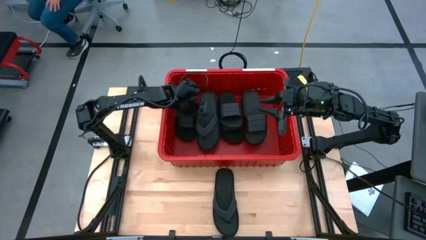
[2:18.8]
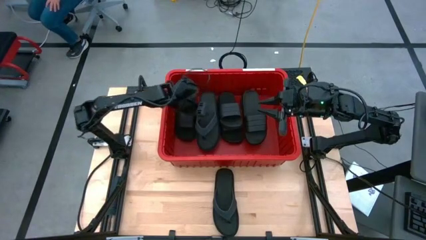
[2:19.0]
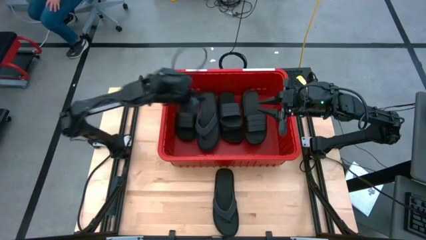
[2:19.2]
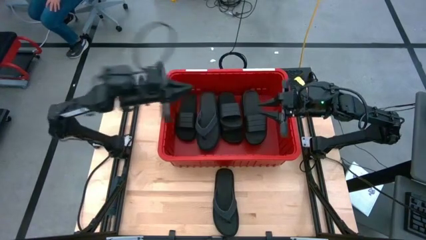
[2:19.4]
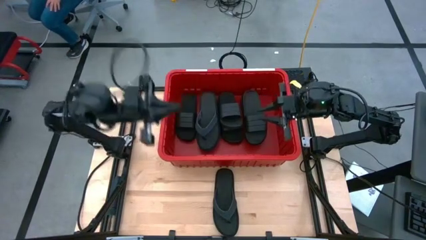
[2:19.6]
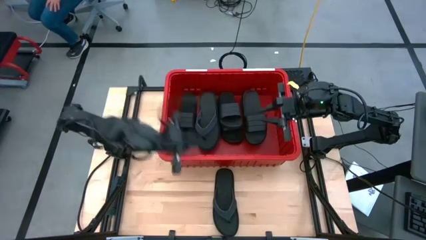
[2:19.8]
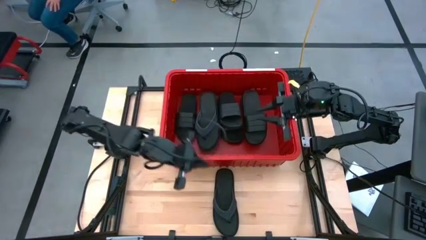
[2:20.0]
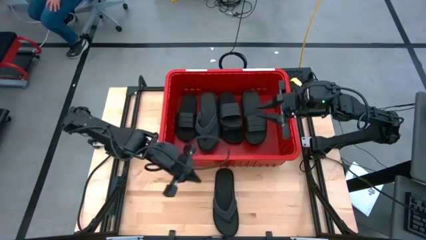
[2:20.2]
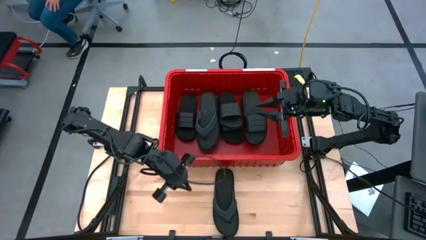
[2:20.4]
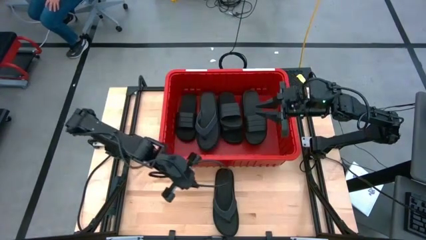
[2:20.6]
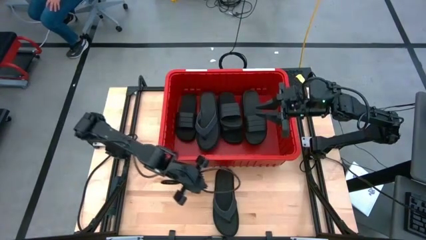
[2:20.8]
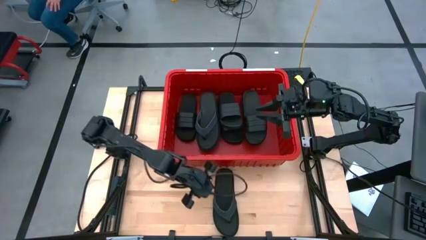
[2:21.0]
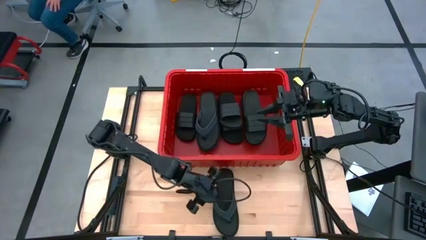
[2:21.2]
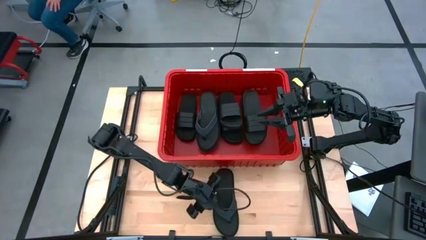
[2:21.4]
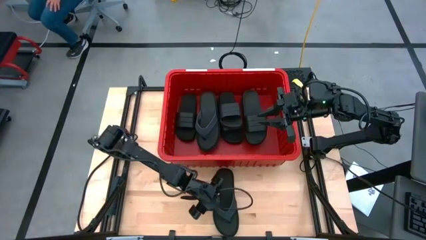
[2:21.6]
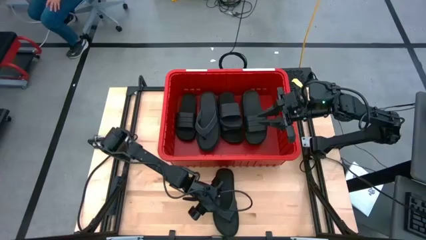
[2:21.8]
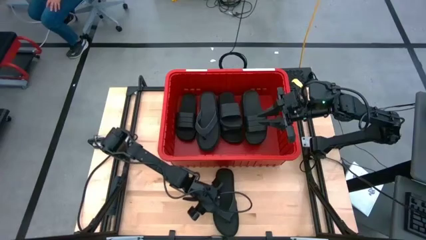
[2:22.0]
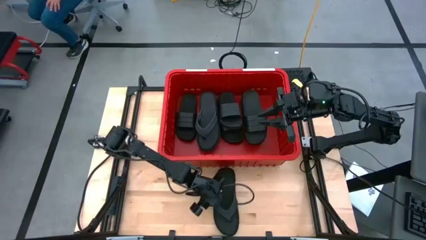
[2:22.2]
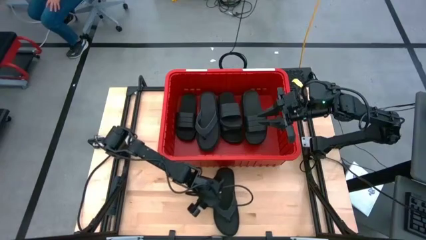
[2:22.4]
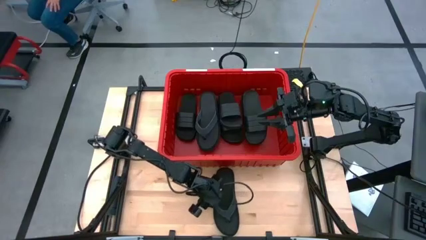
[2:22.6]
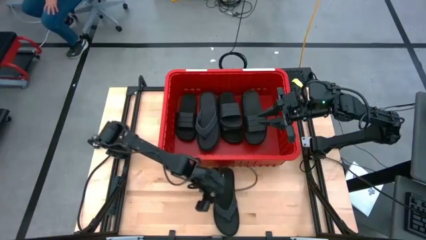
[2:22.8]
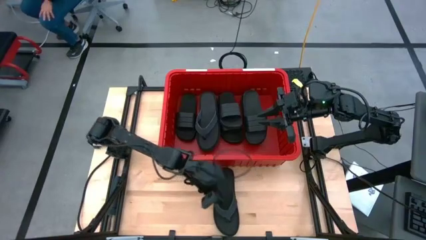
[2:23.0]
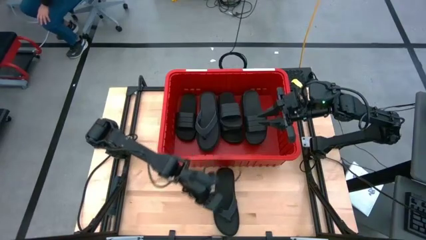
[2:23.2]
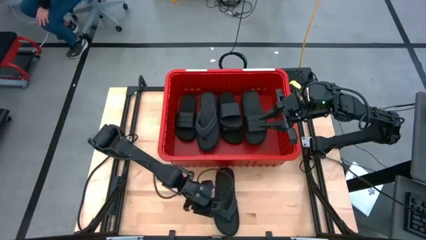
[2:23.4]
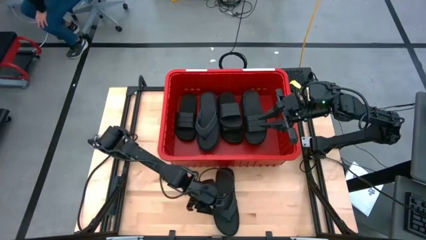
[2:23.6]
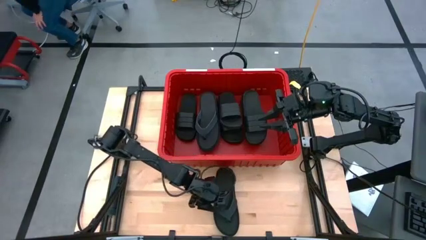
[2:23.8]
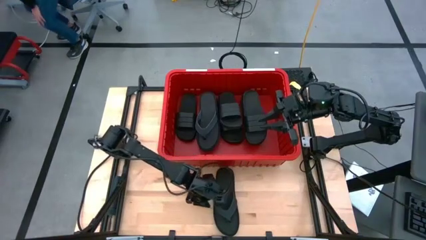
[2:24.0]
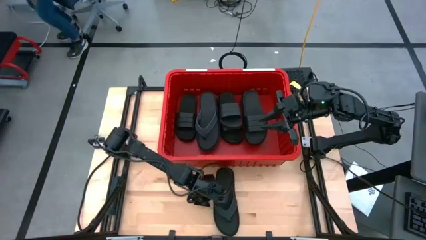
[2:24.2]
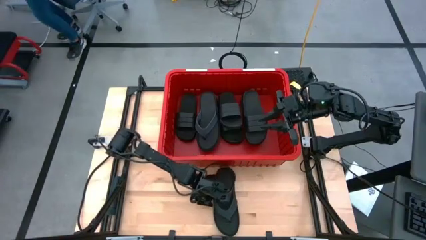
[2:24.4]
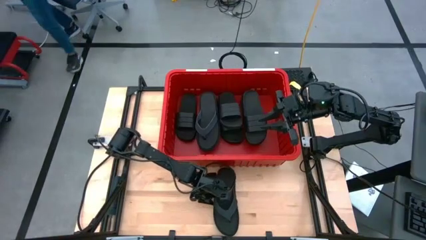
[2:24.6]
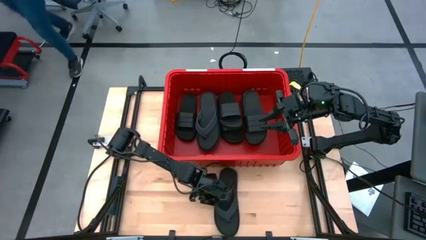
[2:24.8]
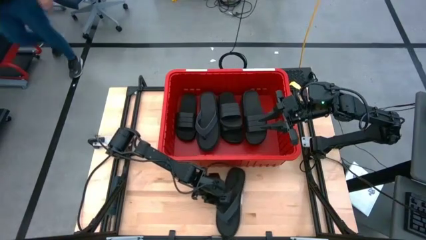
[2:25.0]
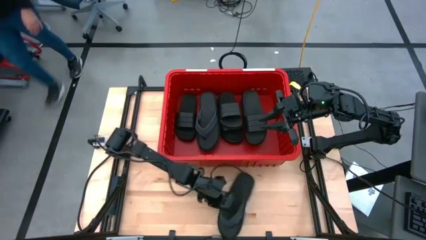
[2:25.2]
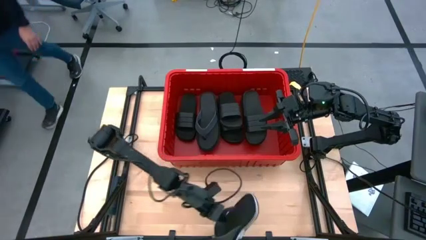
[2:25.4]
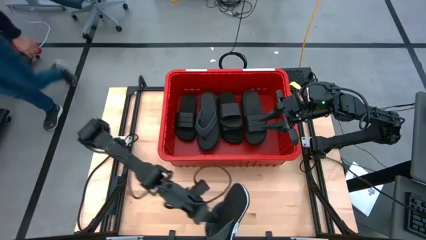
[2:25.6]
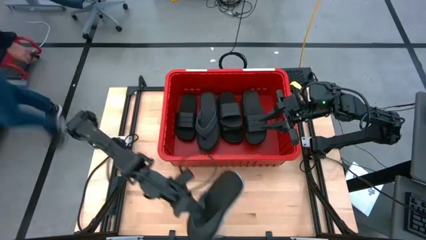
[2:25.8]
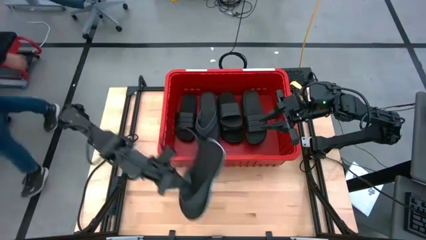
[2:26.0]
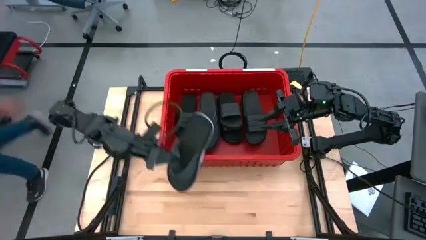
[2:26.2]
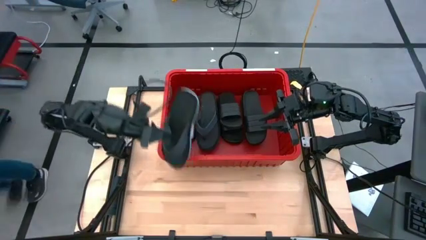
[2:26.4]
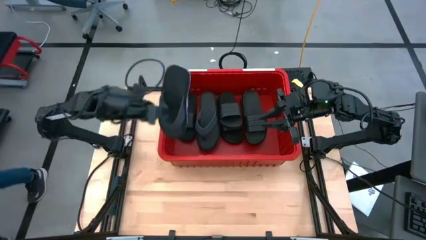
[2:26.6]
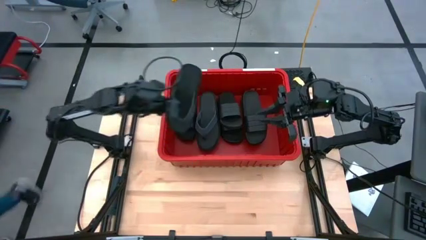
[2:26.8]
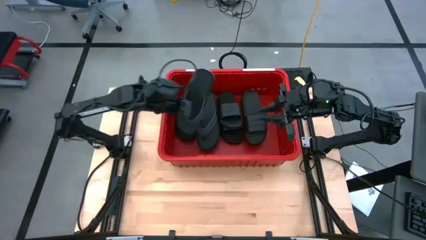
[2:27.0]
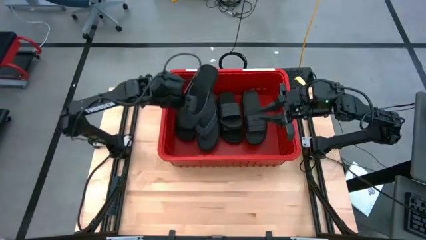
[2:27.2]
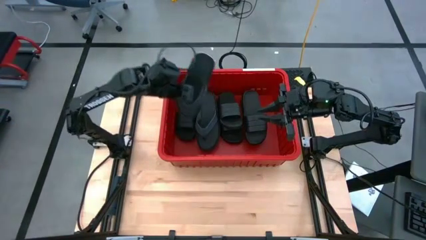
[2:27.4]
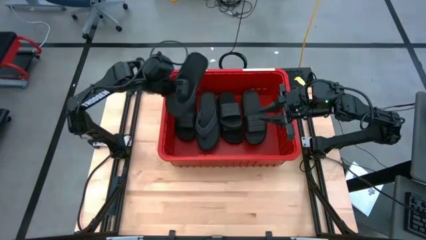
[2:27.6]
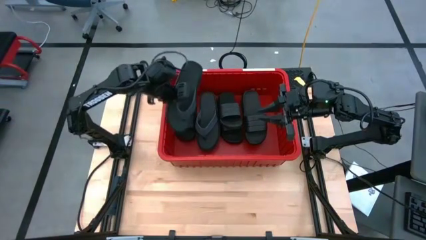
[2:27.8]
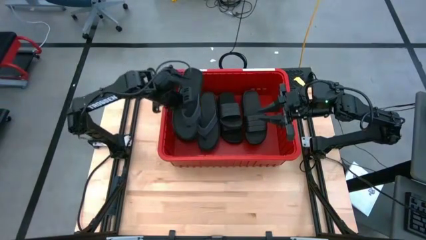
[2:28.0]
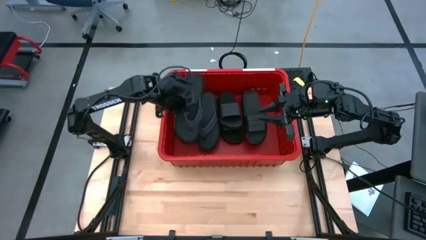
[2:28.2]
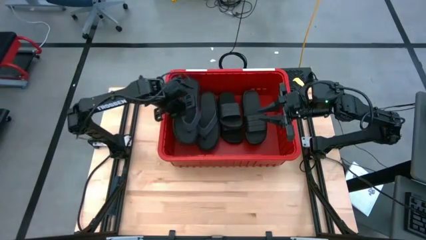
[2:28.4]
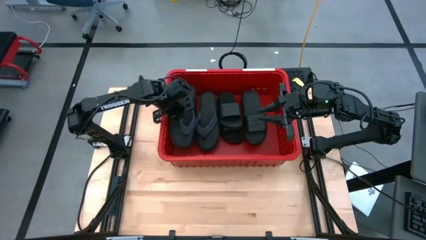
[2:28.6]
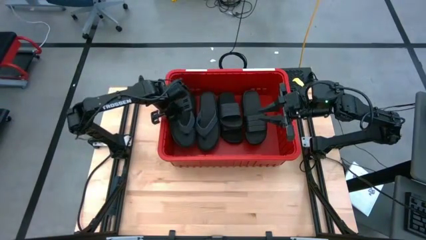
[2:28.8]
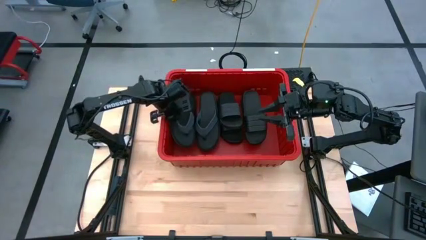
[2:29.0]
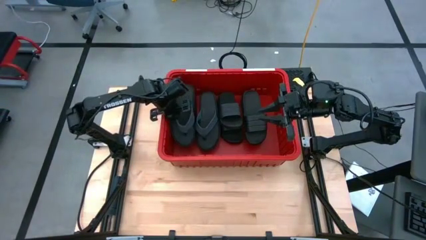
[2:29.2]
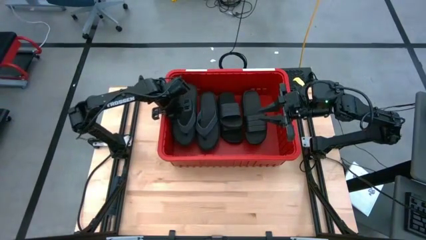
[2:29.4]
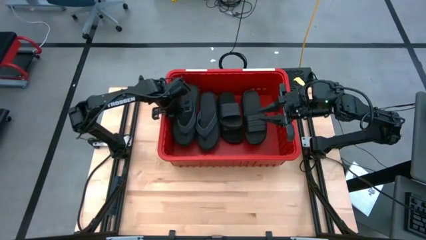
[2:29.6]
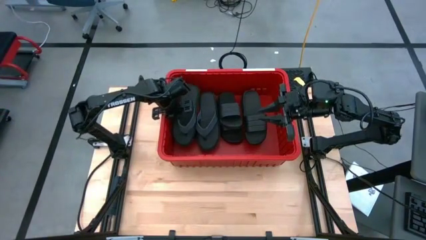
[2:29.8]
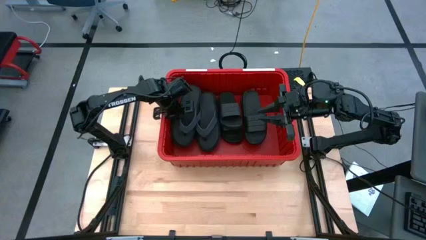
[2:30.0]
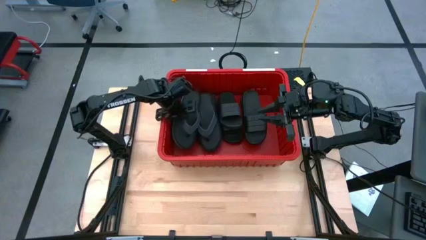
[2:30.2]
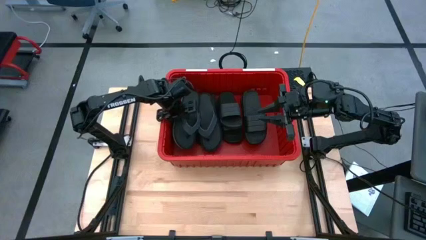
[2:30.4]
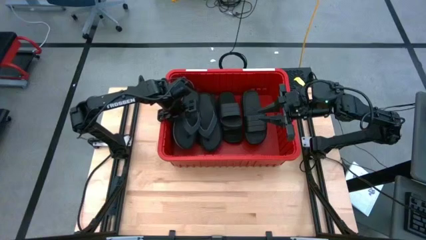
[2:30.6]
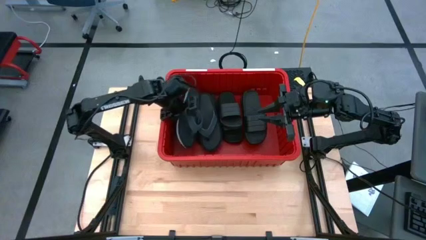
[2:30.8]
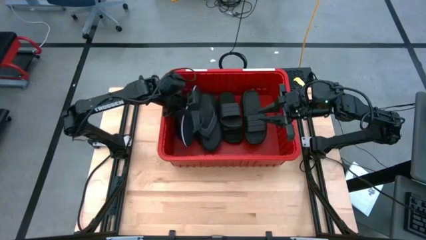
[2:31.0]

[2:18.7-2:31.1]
Task: Pick and place slides into bin
Put the black slides into the red bin
